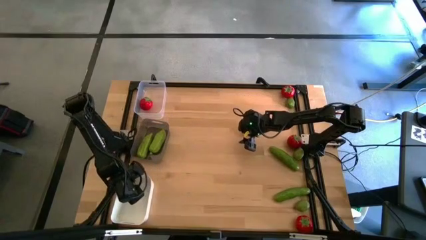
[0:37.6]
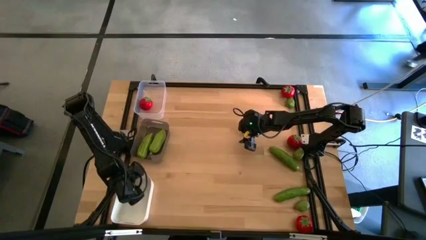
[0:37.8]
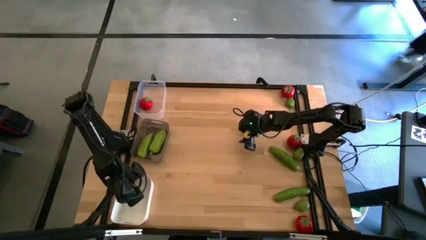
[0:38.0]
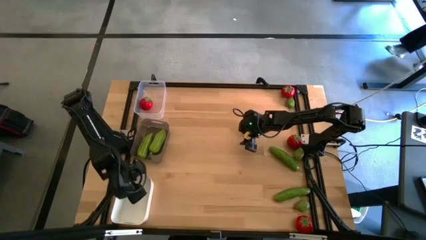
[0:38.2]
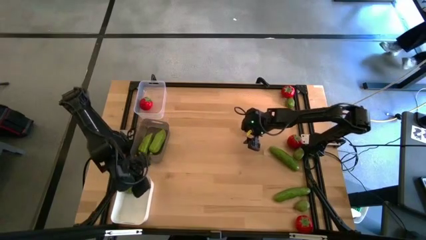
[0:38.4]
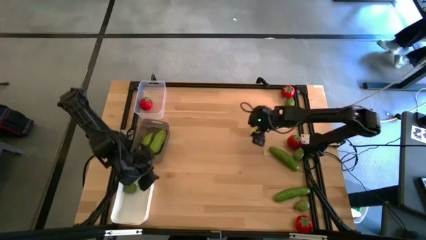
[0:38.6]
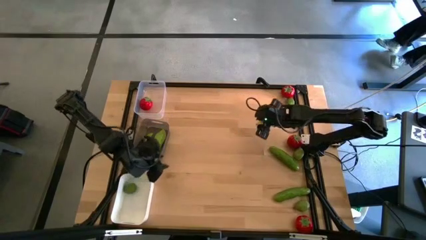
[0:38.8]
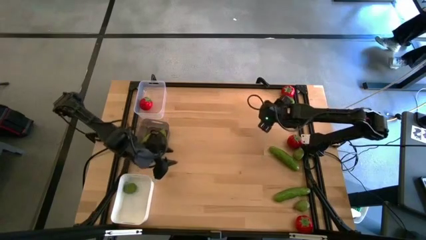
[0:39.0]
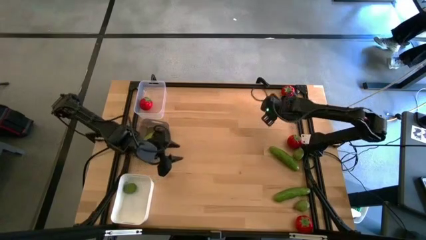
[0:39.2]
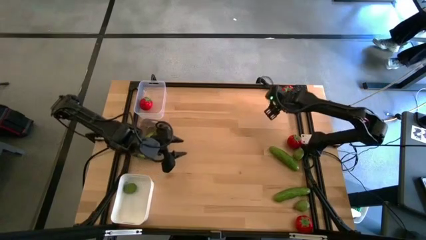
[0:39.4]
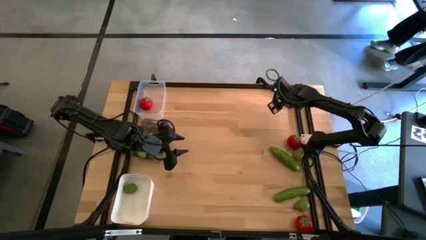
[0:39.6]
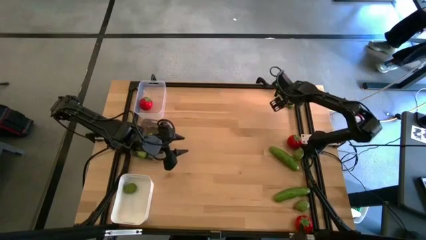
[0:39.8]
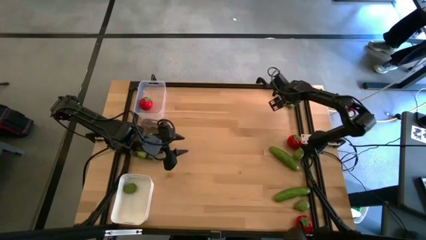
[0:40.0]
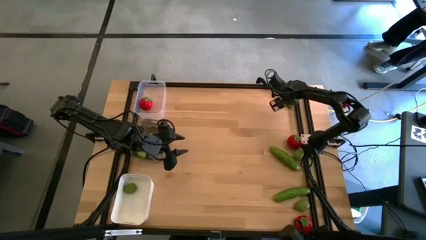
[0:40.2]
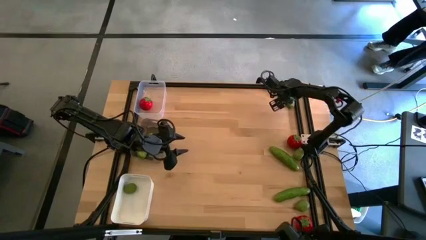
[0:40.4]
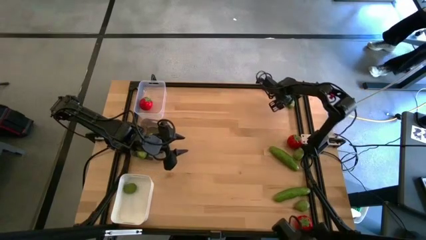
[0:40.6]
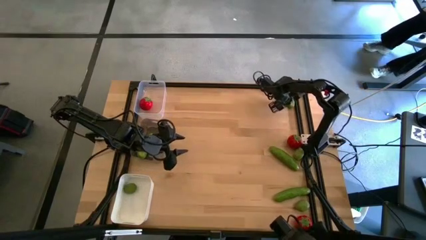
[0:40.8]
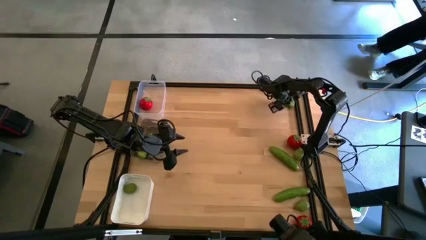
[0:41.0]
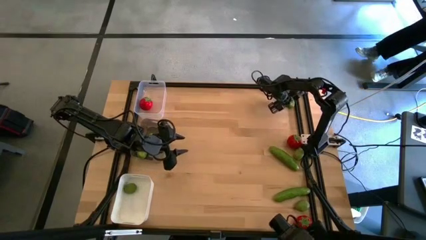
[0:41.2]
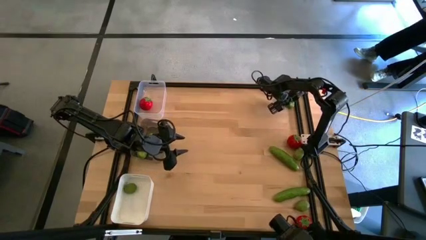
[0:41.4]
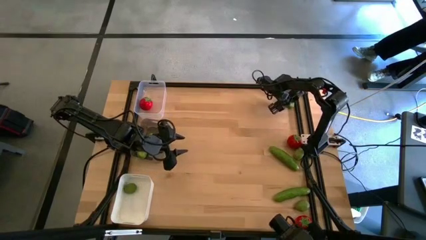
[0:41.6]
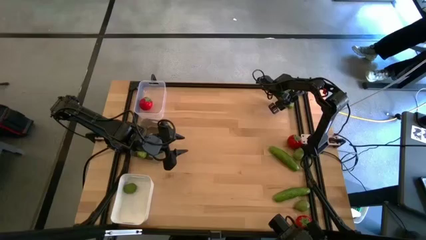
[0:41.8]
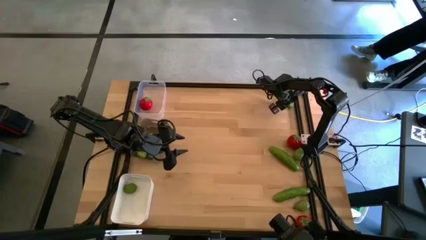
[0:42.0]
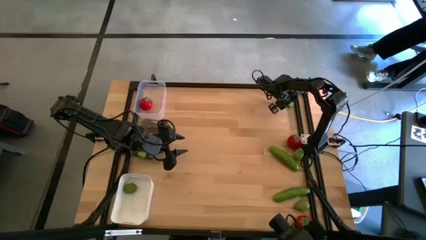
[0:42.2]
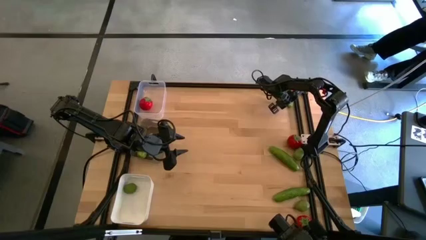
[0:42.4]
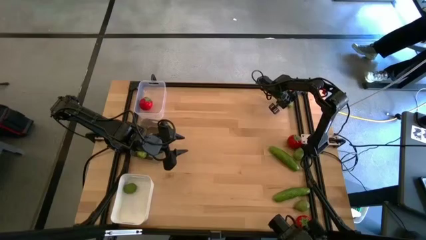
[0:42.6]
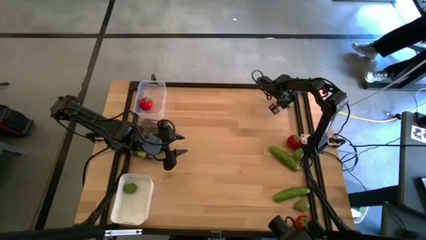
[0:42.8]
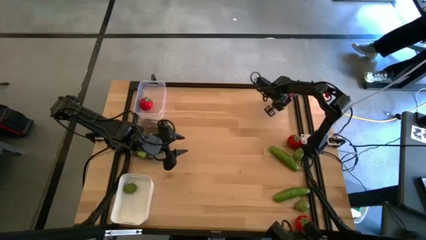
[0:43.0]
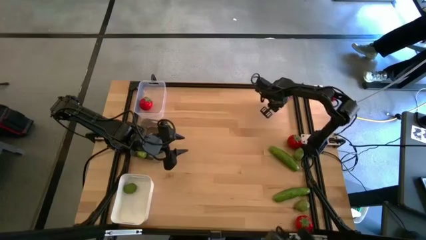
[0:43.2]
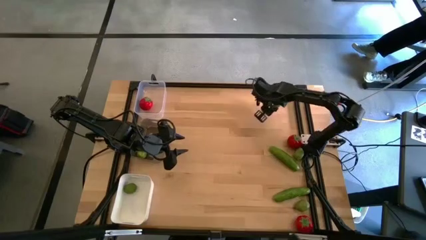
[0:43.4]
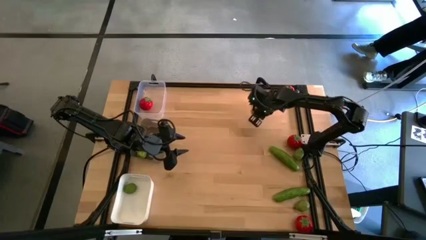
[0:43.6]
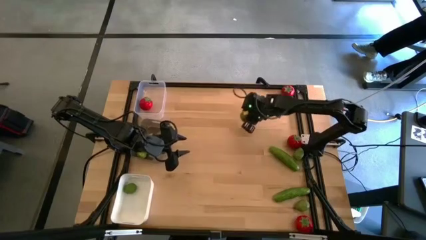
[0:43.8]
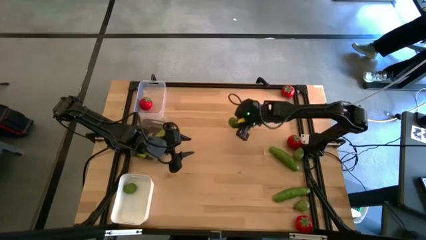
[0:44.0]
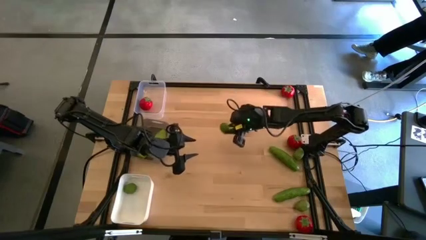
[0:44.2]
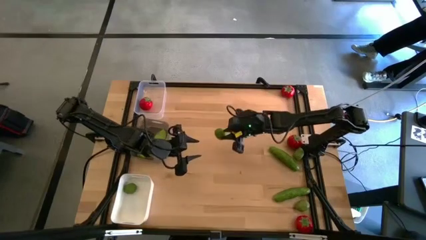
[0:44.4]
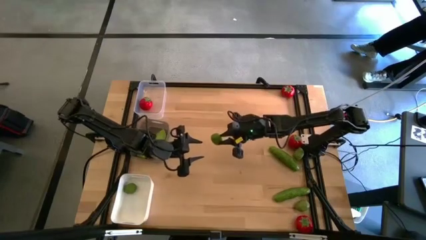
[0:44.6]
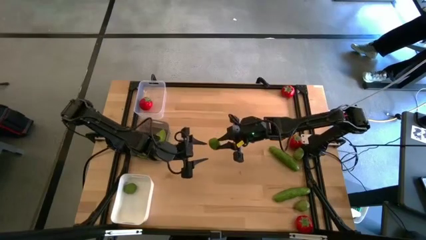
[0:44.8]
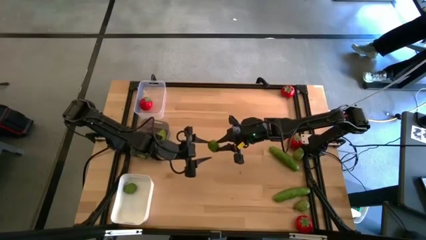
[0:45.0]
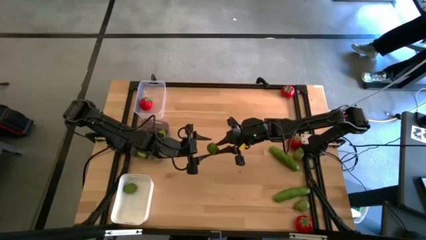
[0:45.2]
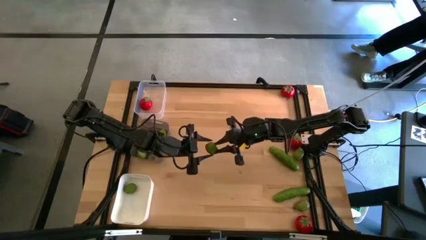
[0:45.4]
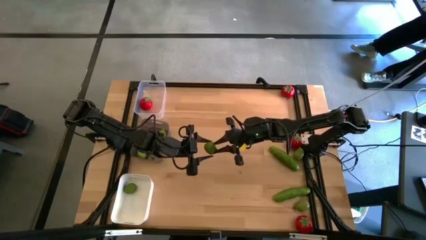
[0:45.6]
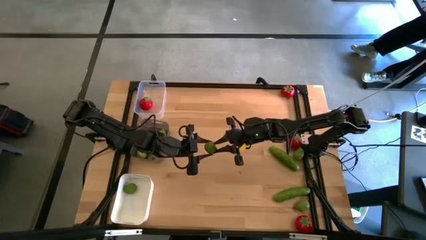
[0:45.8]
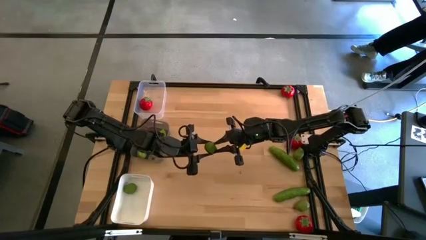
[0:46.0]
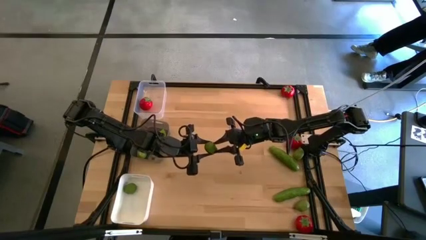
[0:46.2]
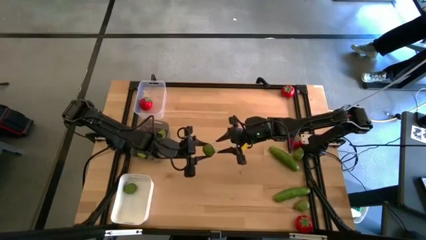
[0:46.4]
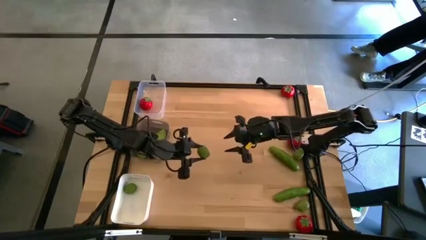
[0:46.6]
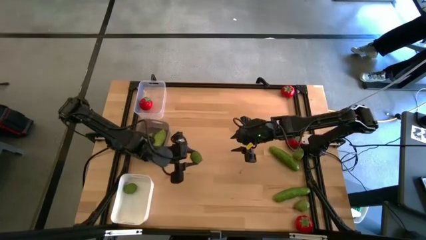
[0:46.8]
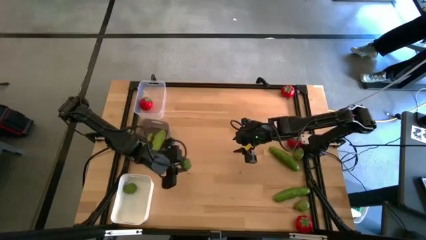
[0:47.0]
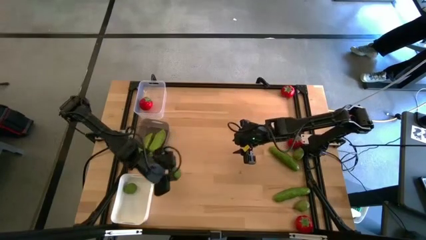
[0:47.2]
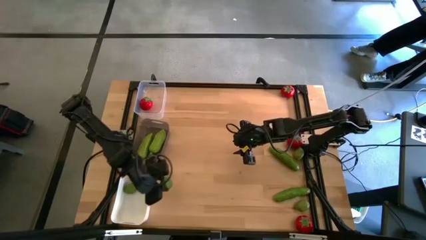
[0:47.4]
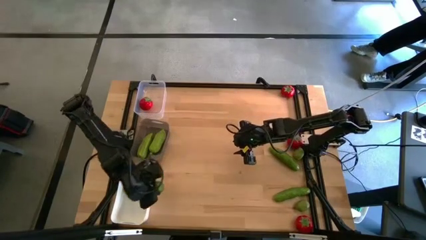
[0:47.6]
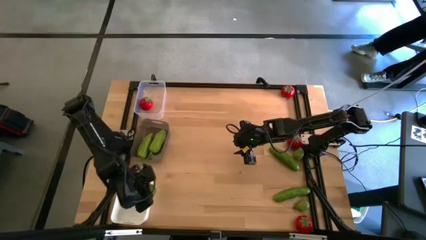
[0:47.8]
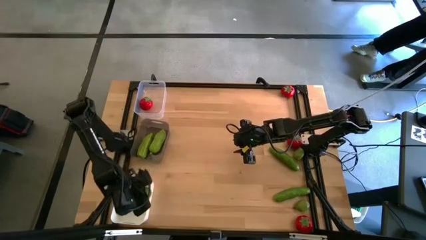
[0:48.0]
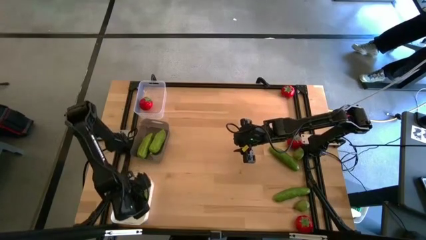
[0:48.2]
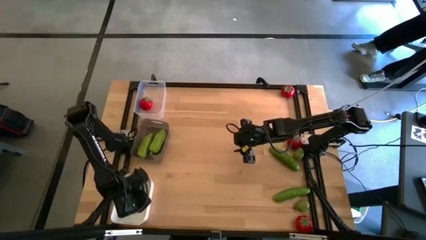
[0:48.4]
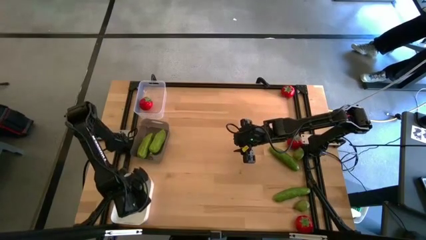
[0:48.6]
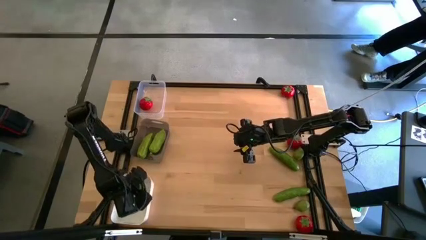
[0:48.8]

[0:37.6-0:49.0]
Task: Sort produce into baskets
Put the top right lime into the white bin

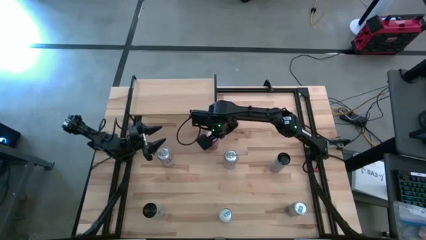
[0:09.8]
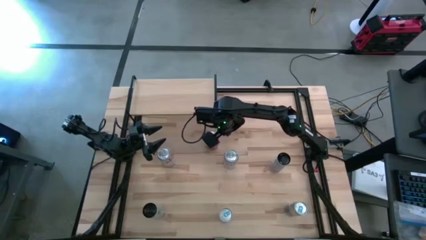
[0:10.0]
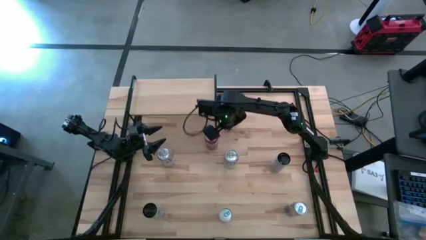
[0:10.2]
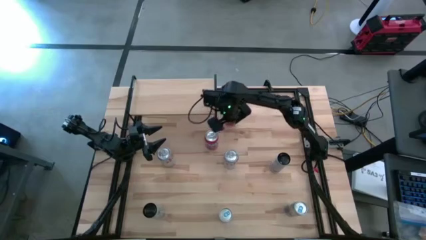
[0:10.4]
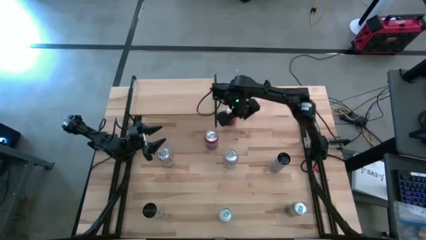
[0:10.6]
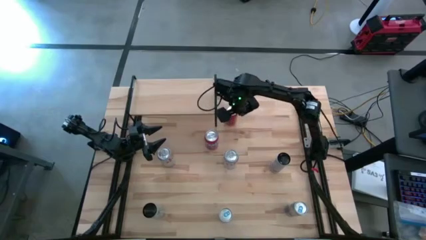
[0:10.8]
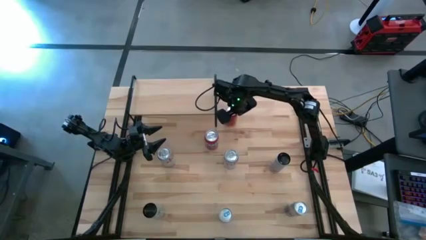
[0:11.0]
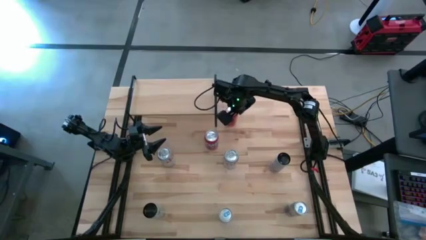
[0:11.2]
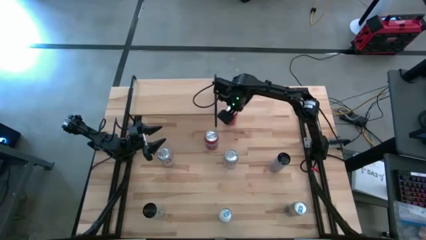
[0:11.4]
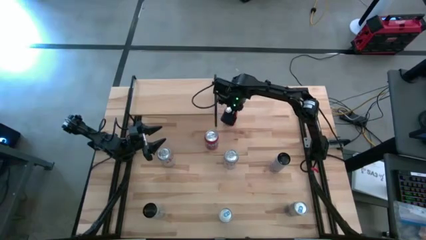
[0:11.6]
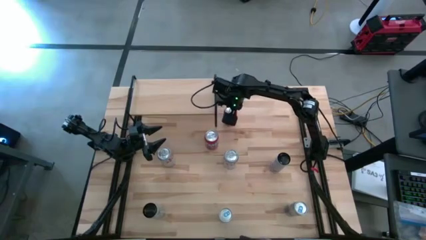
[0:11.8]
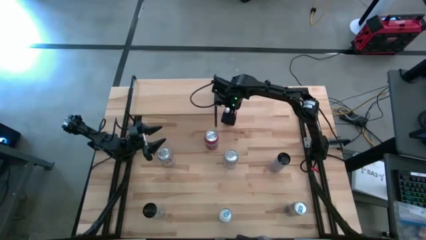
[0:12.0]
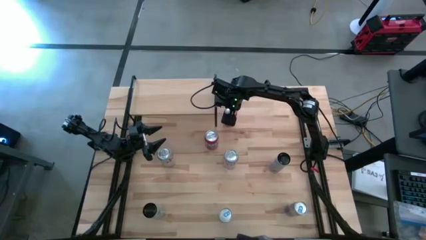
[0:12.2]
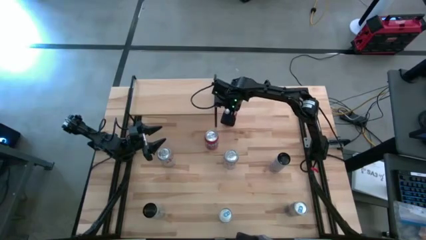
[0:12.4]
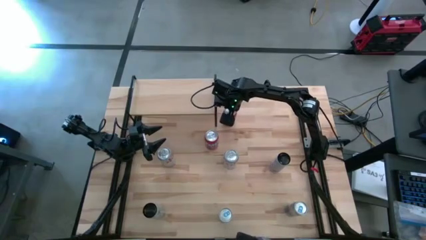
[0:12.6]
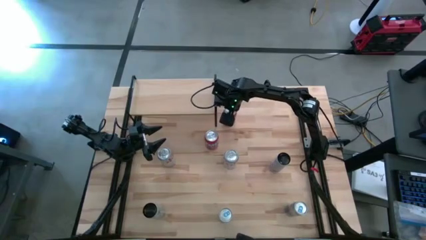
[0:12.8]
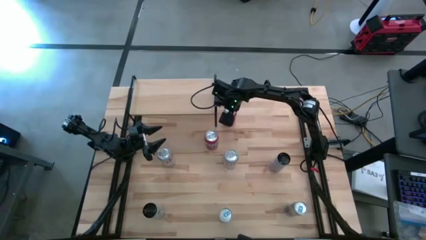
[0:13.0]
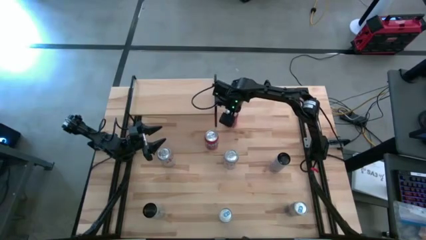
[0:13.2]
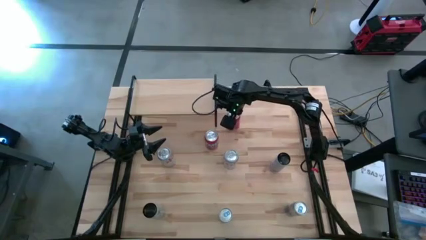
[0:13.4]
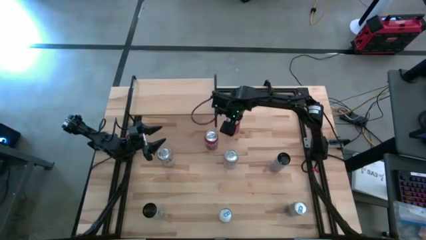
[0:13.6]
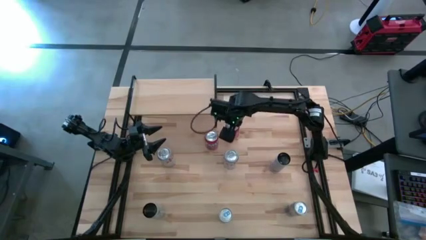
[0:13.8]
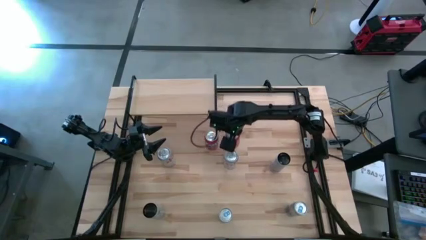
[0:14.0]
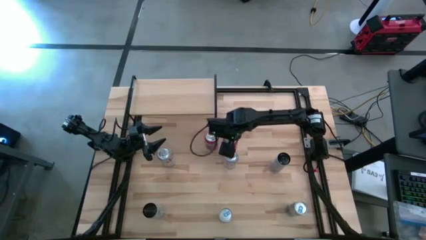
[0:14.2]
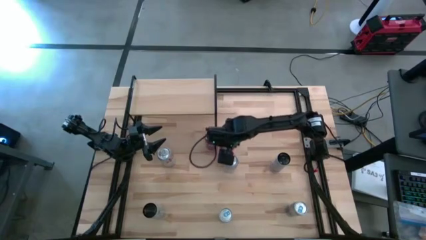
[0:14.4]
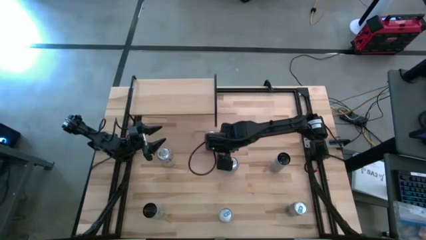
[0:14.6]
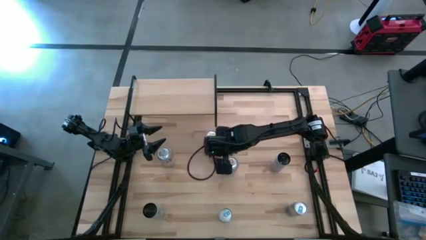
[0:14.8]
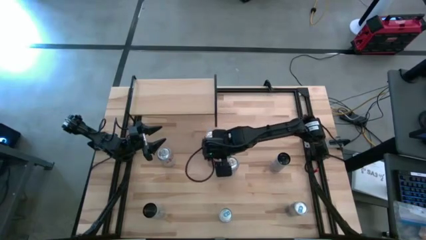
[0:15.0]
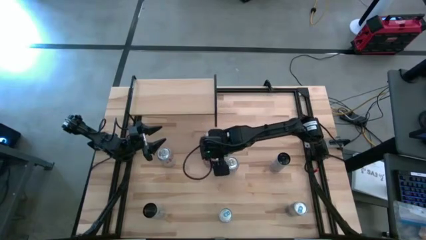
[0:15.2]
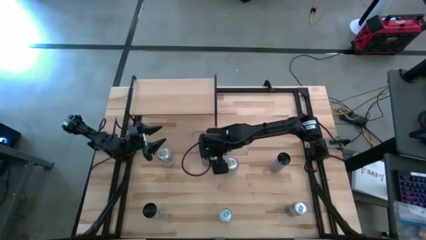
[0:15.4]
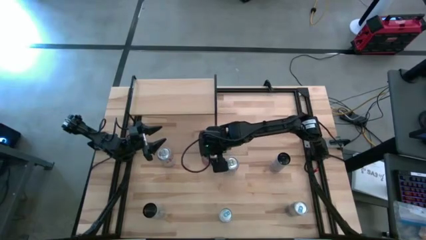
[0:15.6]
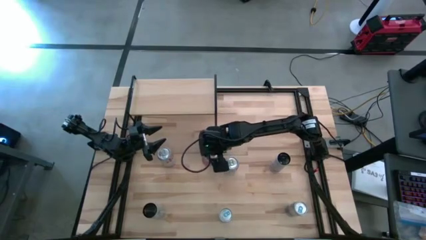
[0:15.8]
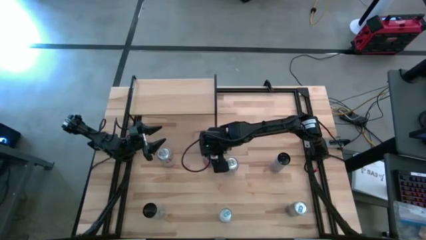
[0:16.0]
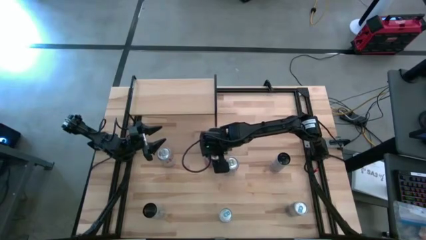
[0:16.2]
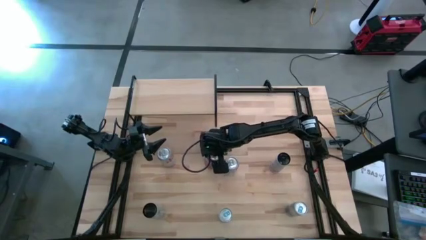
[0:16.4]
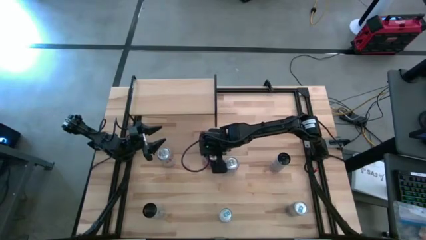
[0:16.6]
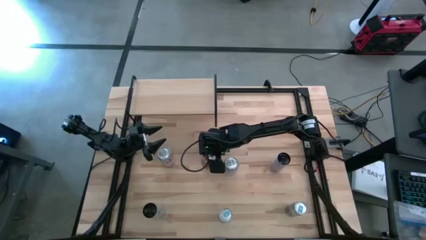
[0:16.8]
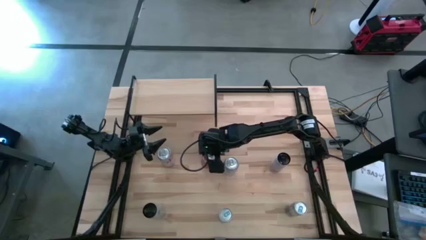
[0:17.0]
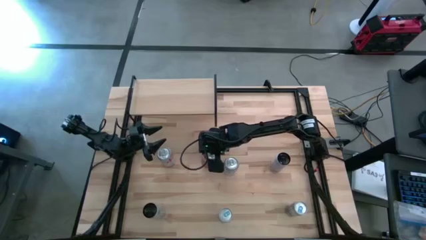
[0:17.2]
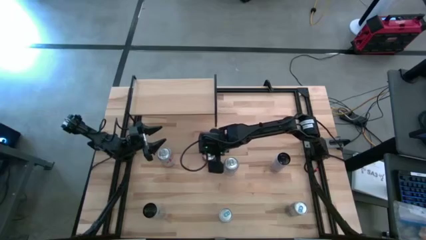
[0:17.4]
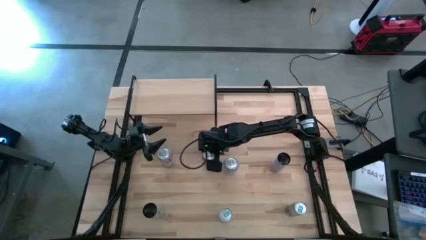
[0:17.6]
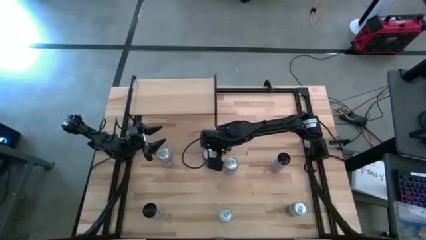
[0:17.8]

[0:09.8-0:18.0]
Task: Place canned beverage on shelf
Move the top orange soda can below the center orange can
